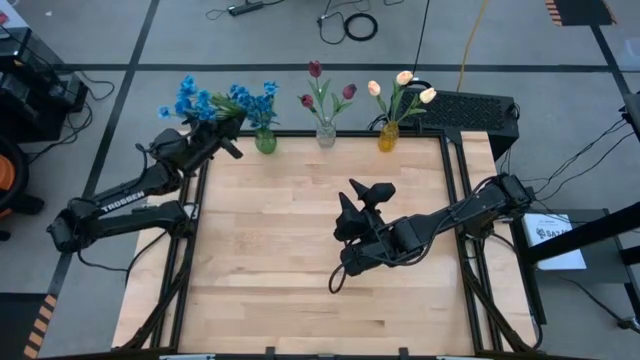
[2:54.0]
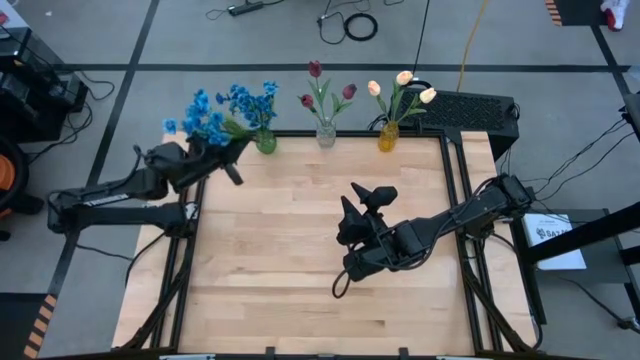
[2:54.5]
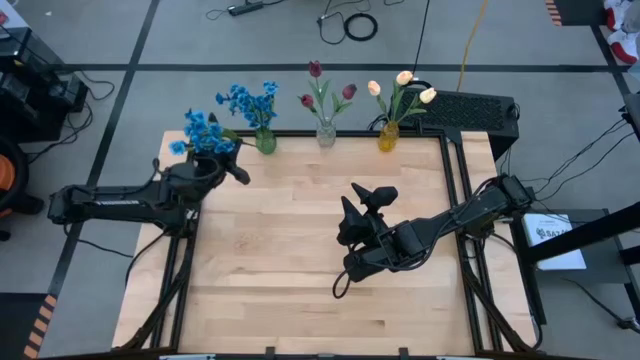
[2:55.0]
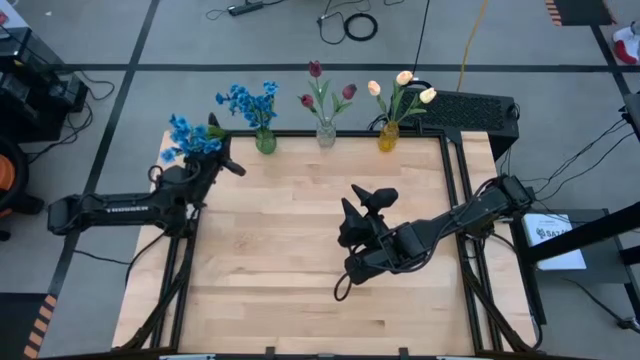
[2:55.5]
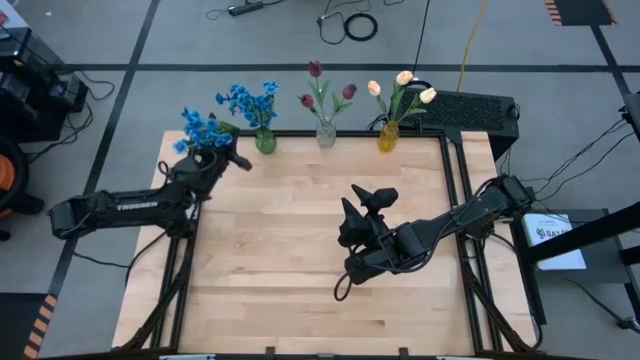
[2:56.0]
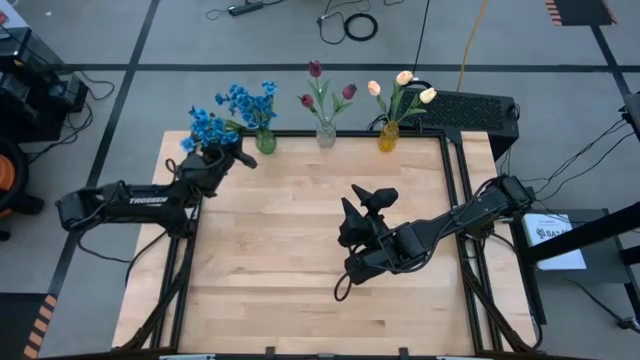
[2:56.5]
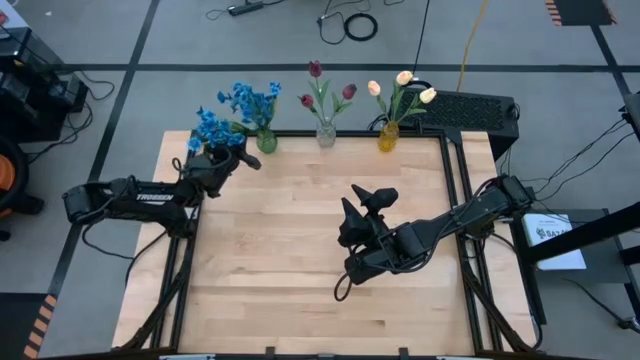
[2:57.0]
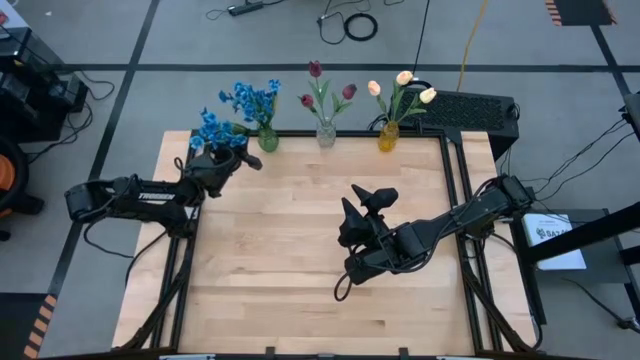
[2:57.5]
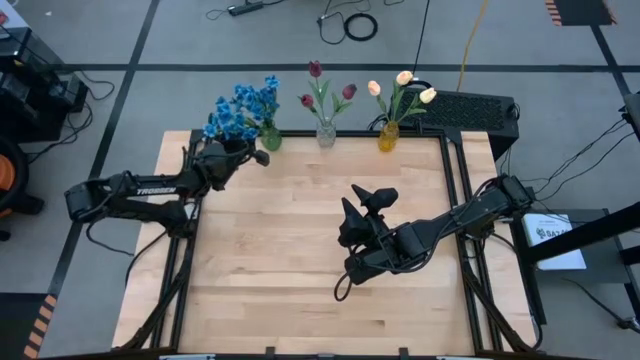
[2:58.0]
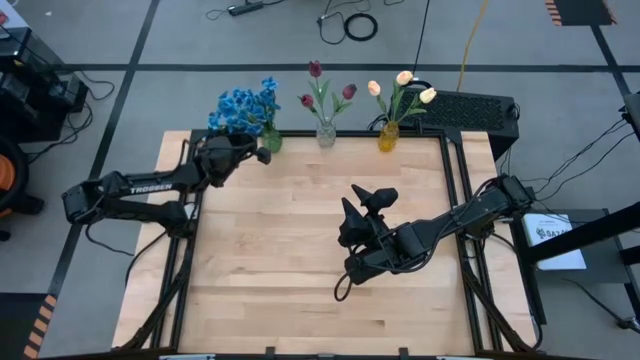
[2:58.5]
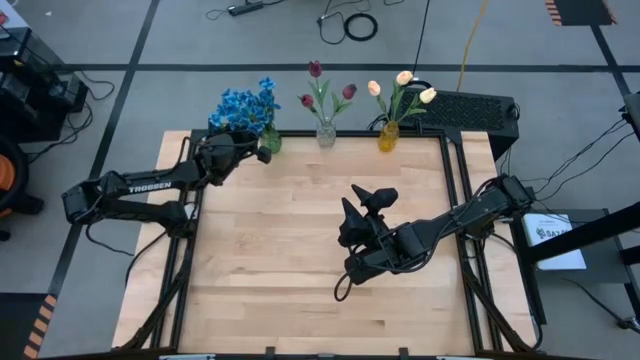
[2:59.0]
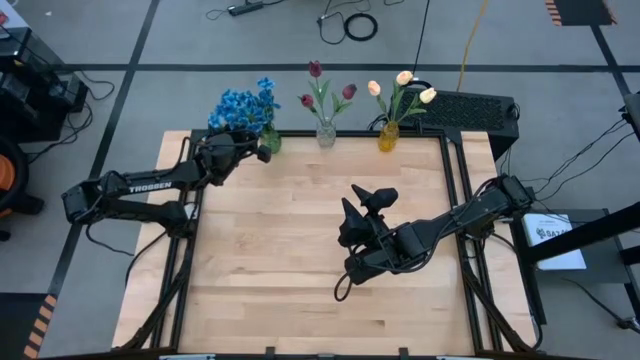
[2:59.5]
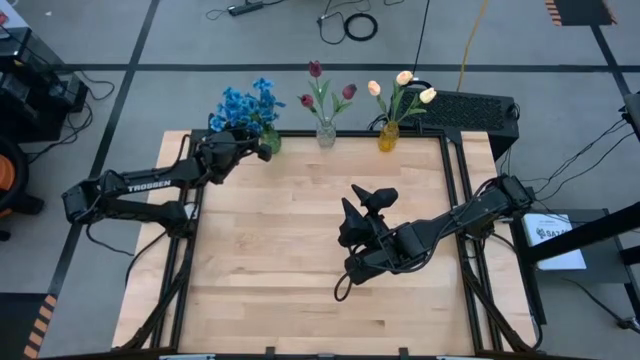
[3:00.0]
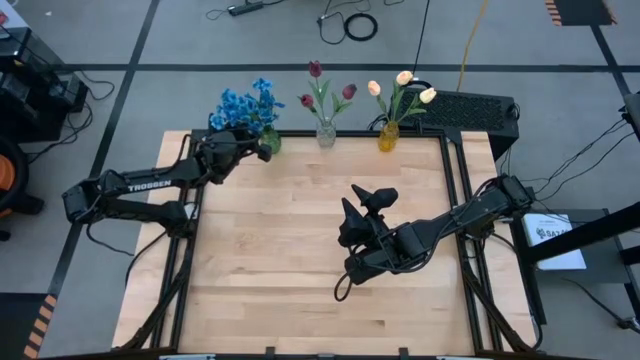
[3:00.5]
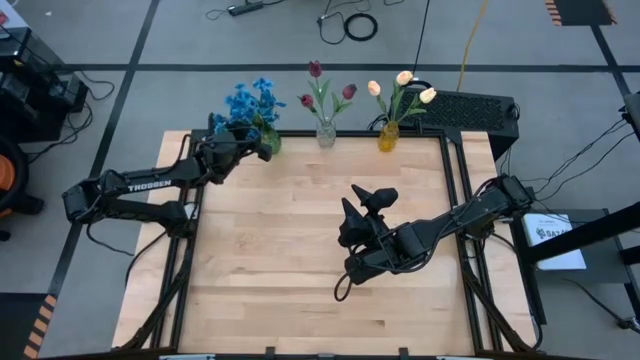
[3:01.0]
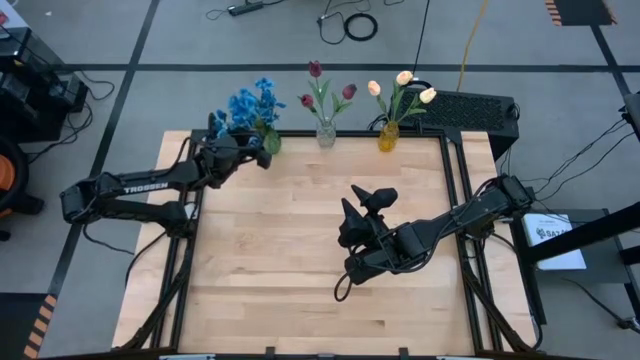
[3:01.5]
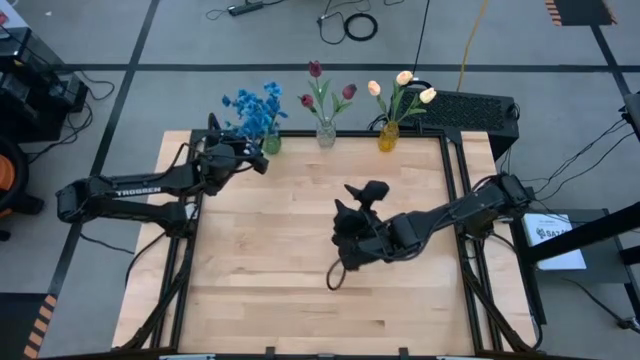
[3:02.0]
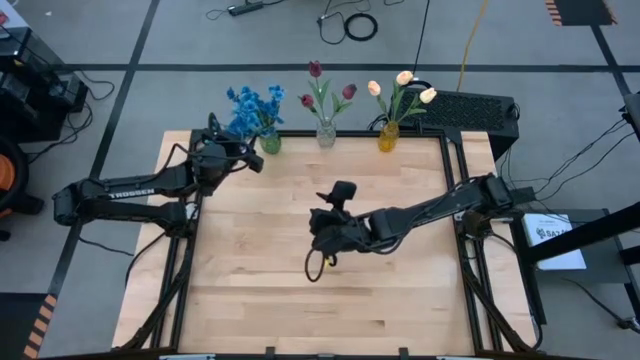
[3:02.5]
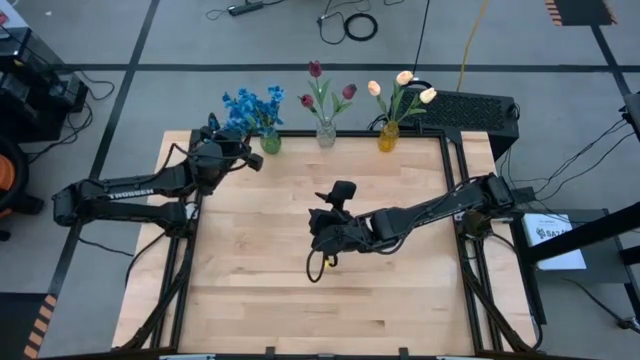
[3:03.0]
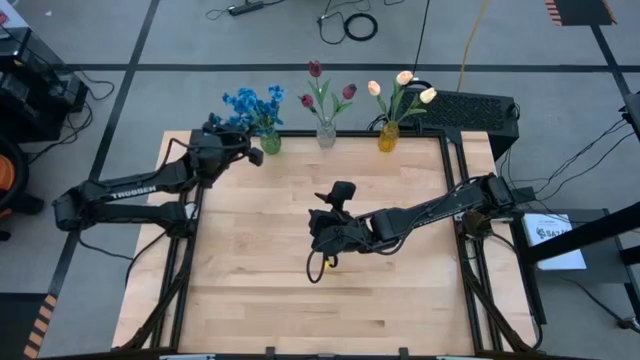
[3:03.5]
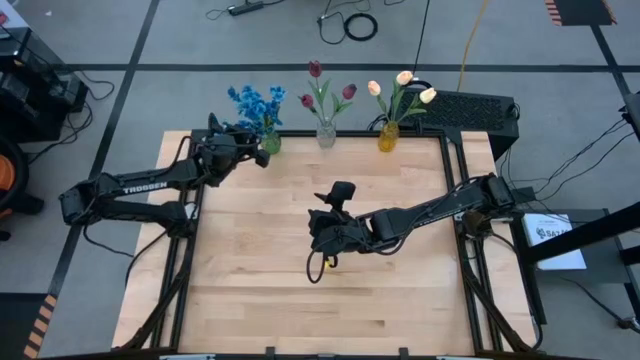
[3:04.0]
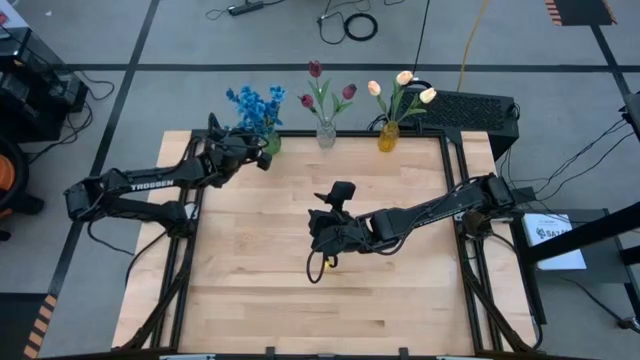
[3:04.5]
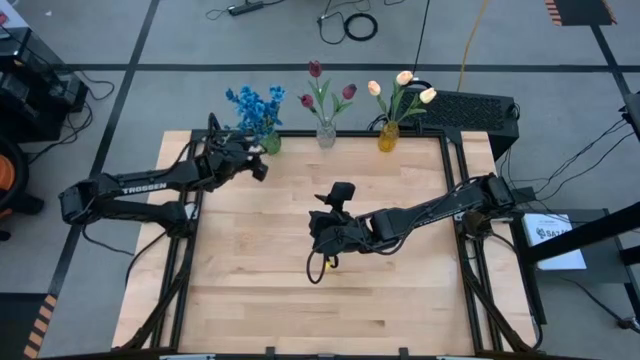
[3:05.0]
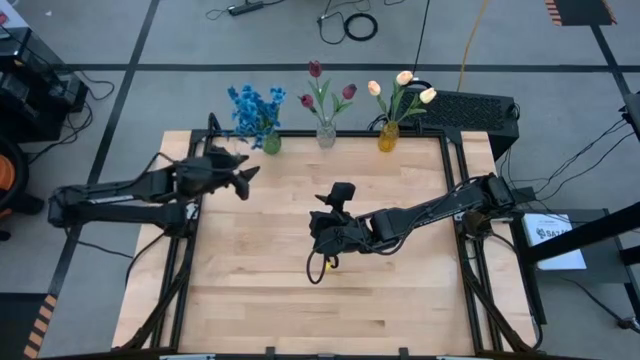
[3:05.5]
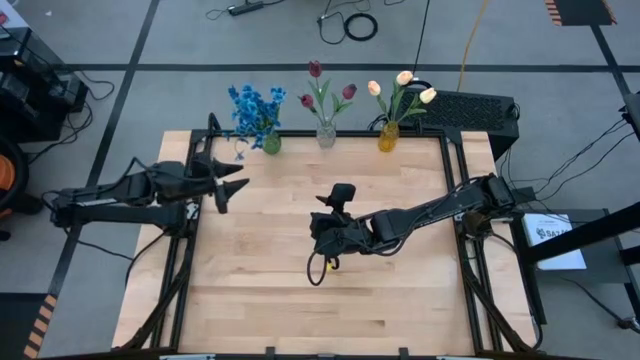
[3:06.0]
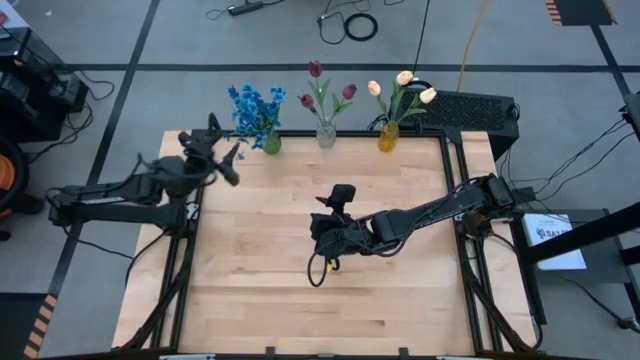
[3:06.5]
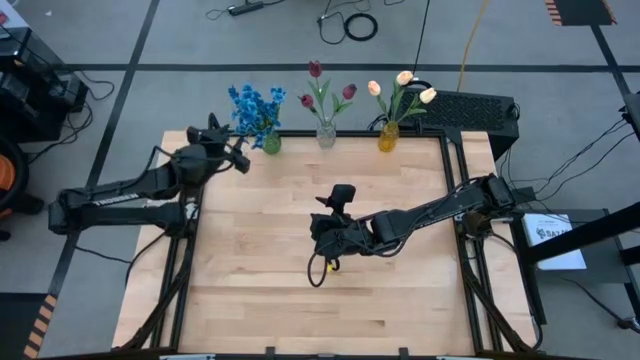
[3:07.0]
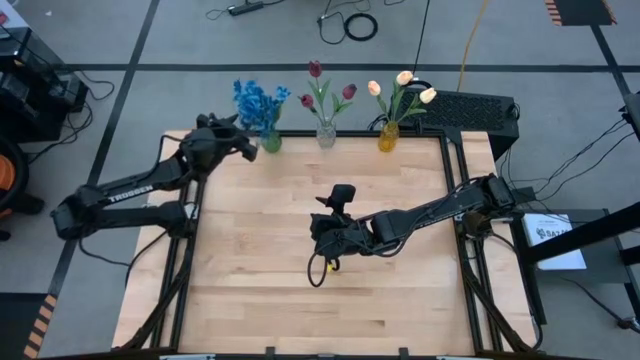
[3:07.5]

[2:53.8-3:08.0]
Task: Sort flowers into vase by color
Put the blue flowers into the green flower vase

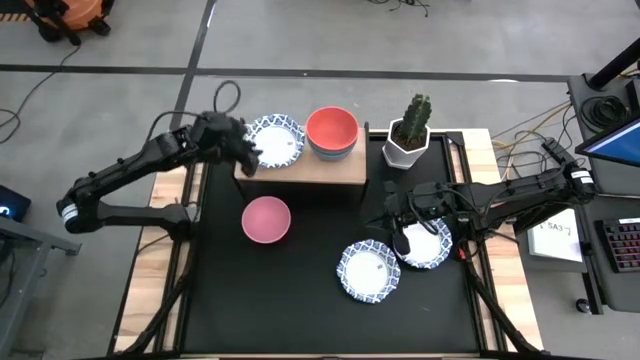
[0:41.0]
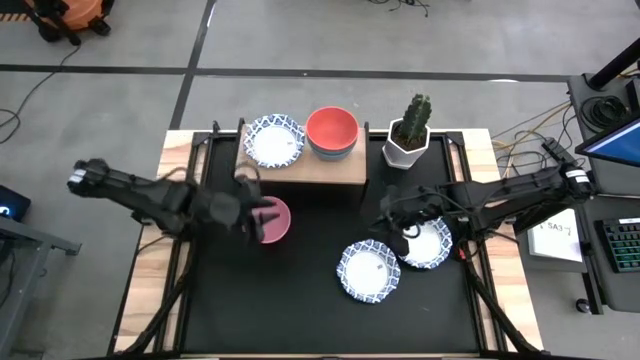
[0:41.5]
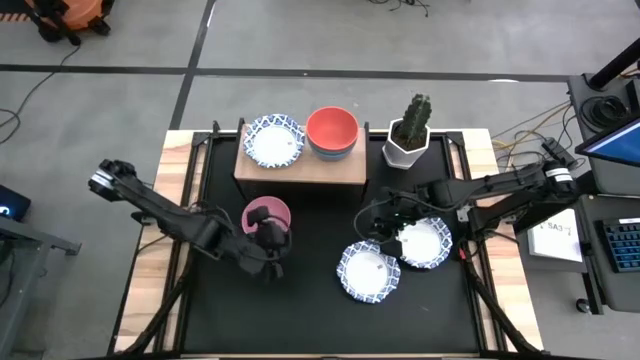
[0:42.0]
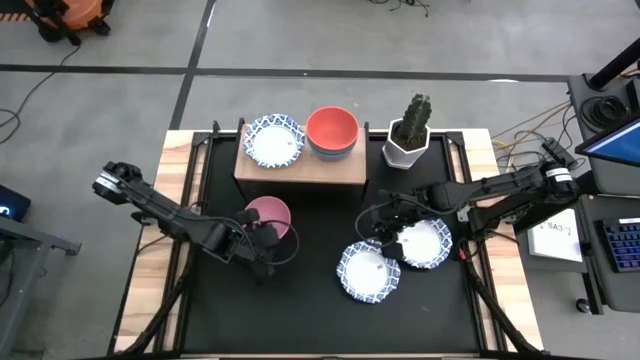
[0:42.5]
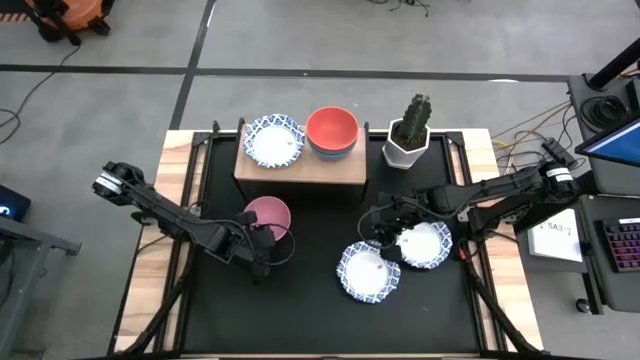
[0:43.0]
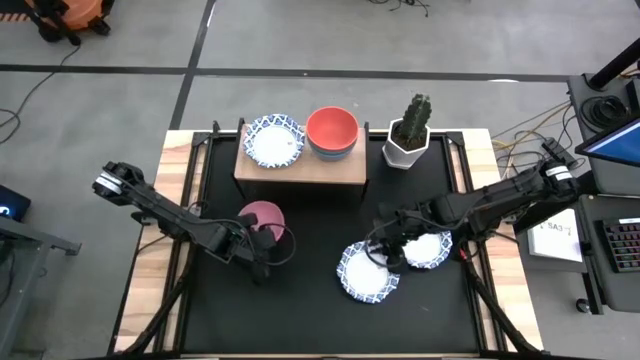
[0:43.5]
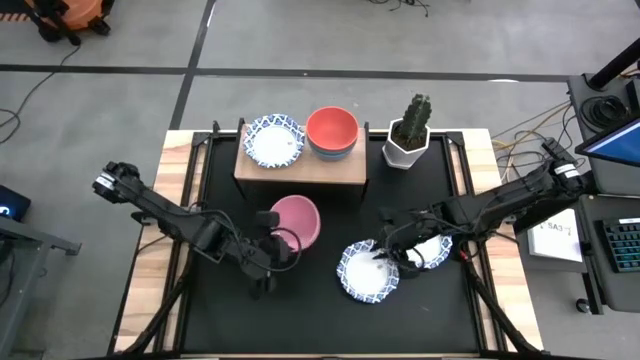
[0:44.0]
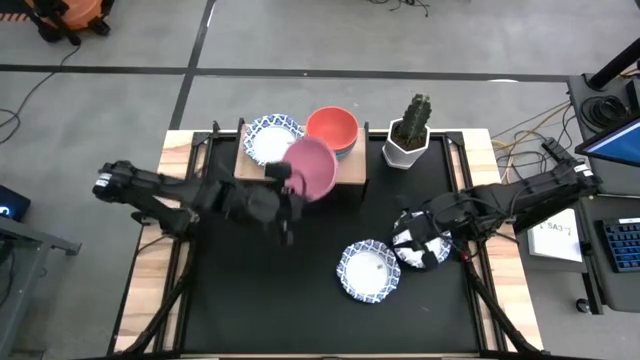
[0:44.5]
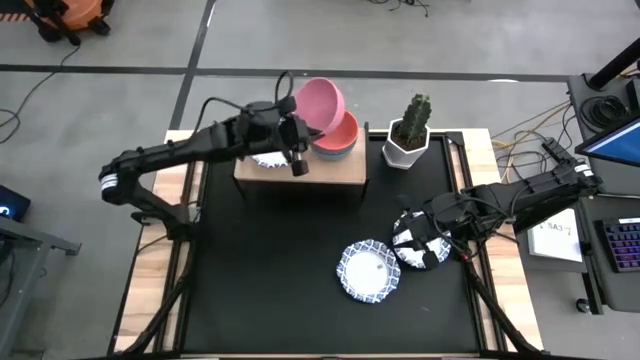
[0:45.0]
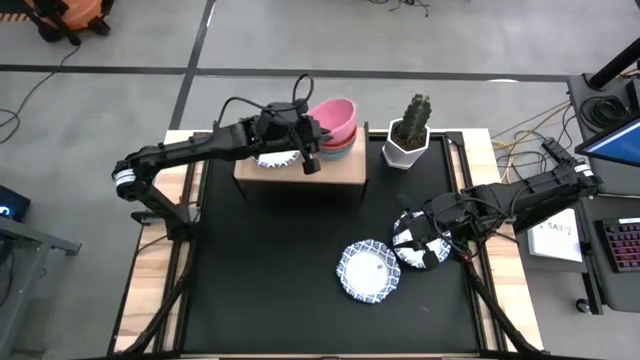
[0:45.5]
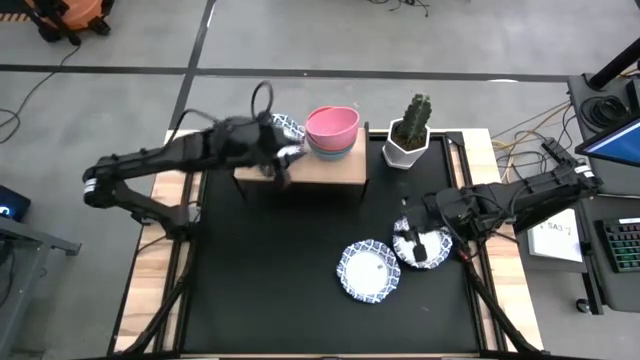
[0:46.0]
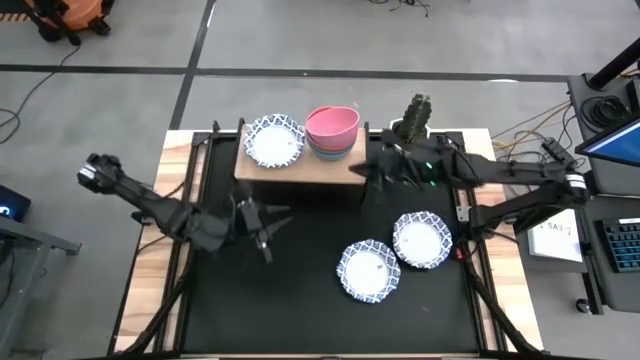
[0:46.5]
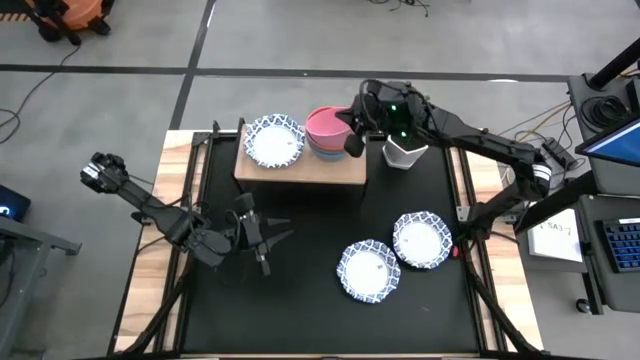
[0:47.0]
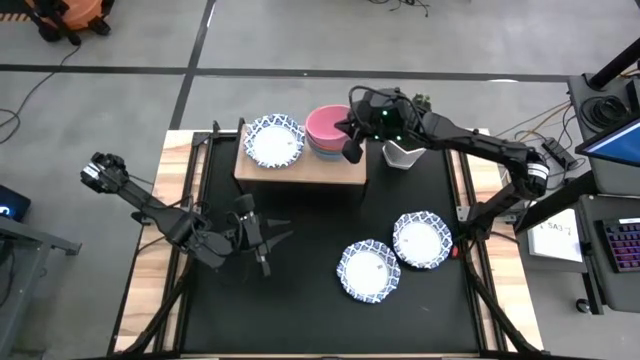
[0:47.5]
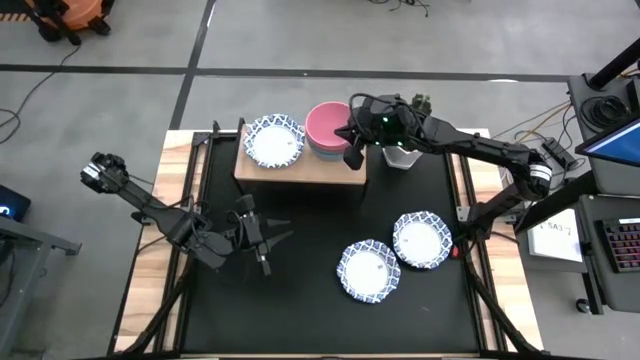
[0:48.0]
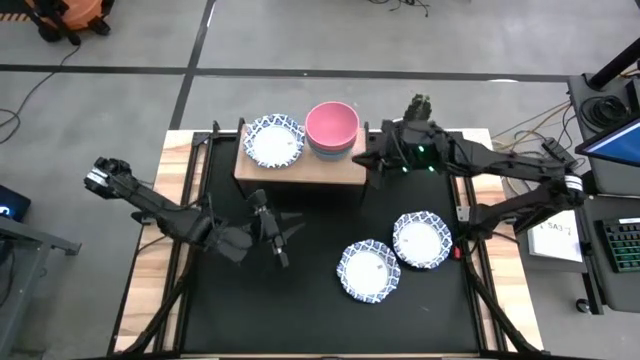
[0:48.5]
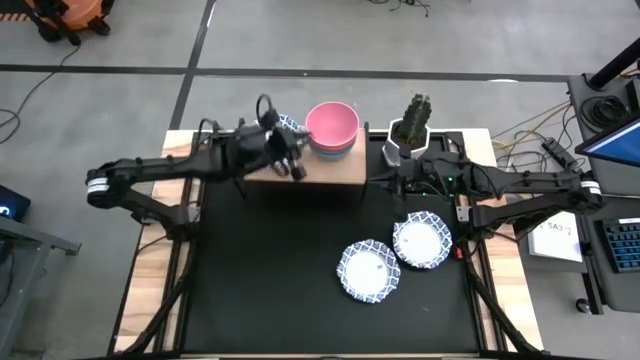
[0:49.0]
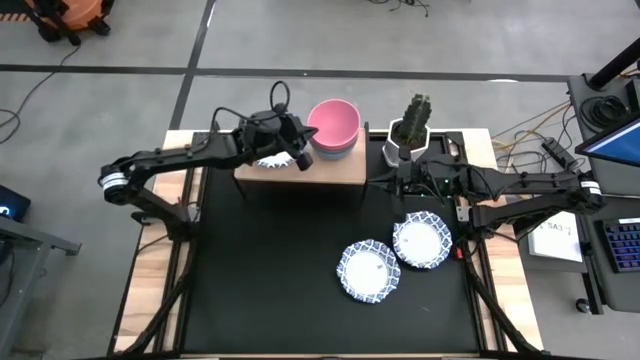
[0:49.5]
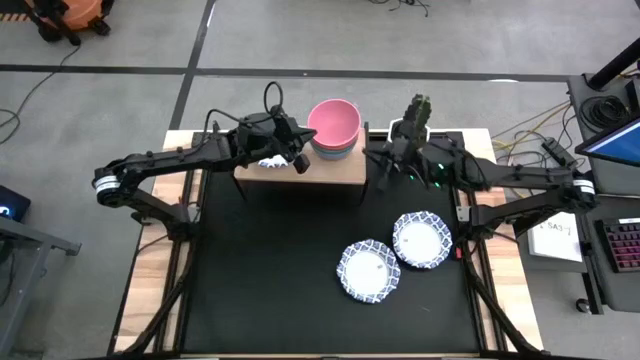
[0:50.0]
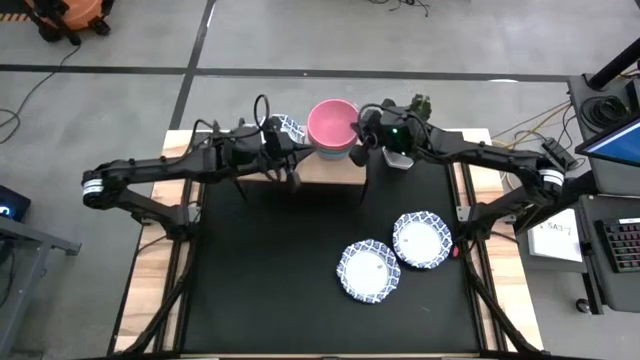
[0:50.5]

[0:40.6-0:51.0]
Task: Place and stack bowls onto a shelf
Stack the pink bowl on top of the orange bowl on the shelf
